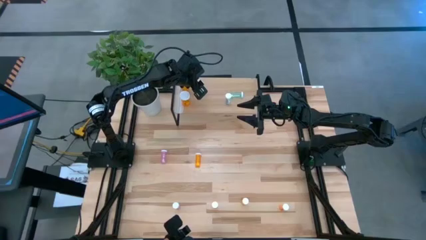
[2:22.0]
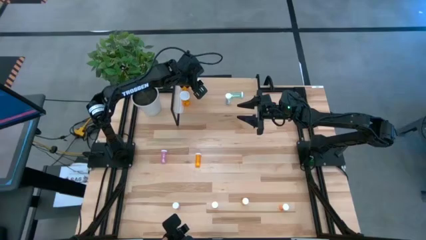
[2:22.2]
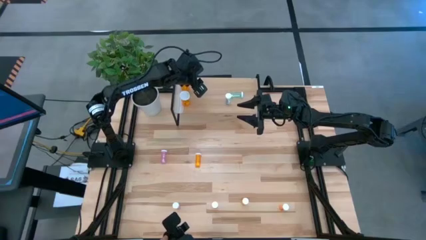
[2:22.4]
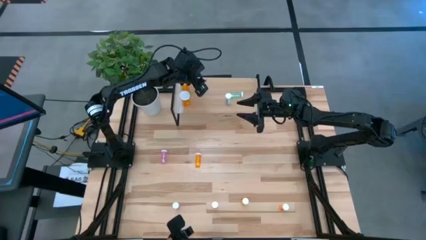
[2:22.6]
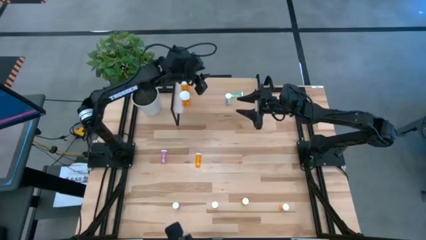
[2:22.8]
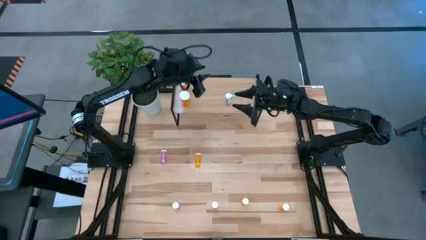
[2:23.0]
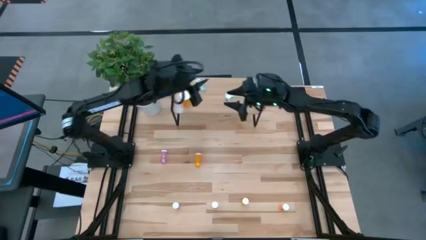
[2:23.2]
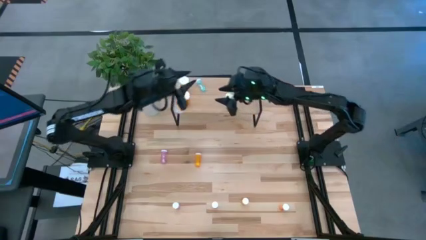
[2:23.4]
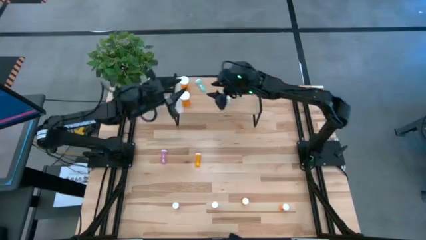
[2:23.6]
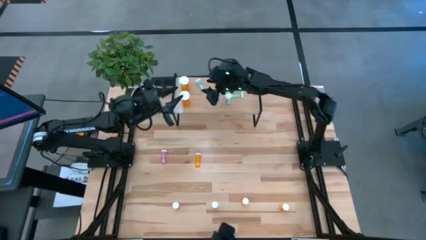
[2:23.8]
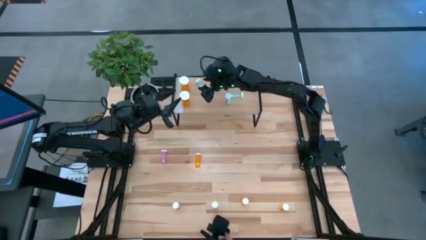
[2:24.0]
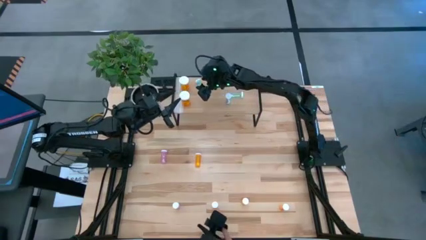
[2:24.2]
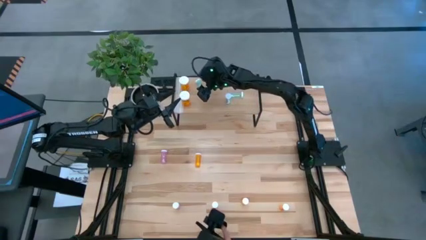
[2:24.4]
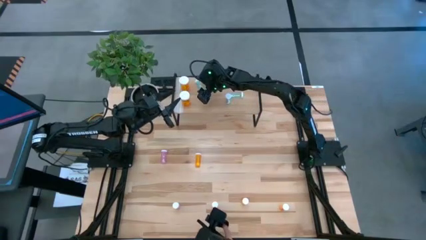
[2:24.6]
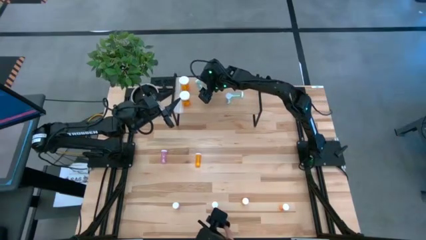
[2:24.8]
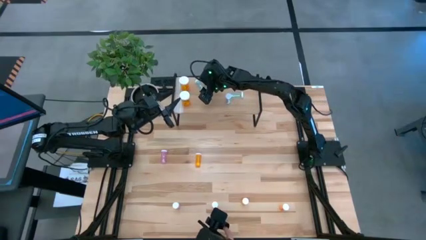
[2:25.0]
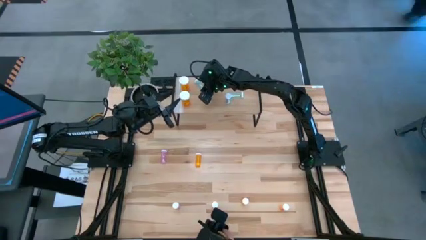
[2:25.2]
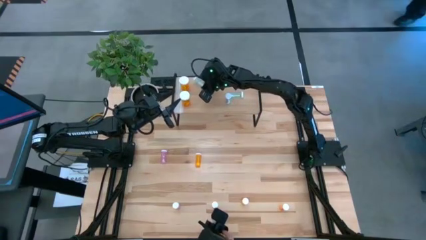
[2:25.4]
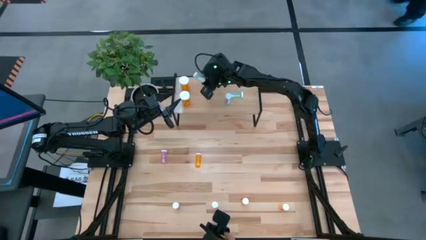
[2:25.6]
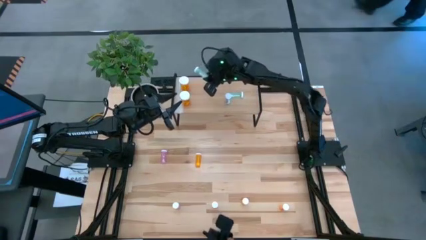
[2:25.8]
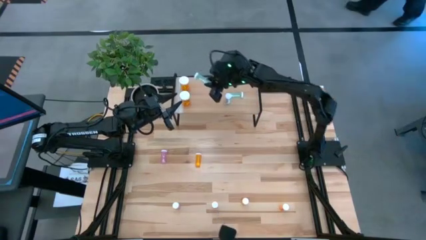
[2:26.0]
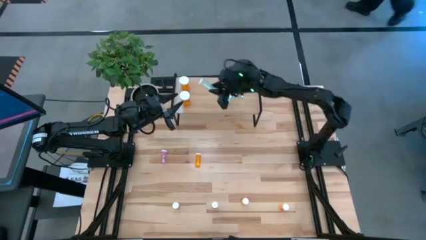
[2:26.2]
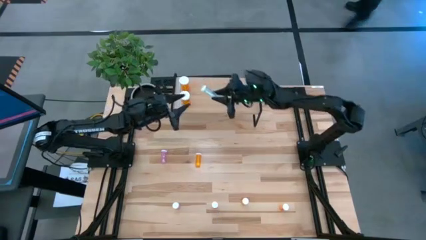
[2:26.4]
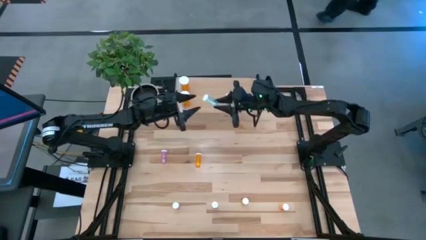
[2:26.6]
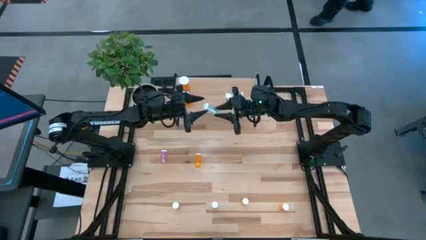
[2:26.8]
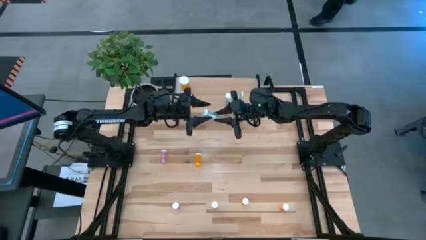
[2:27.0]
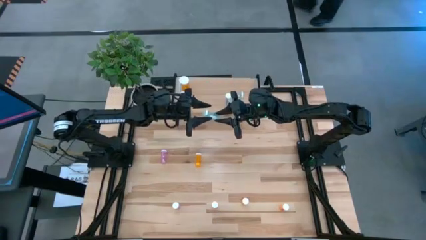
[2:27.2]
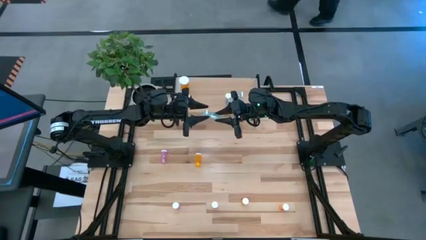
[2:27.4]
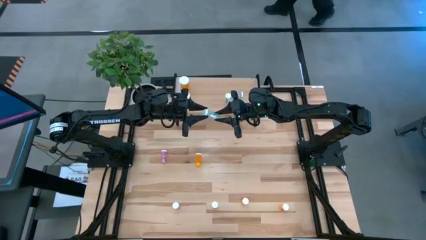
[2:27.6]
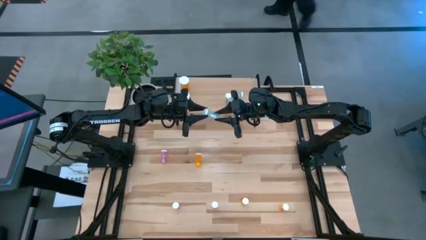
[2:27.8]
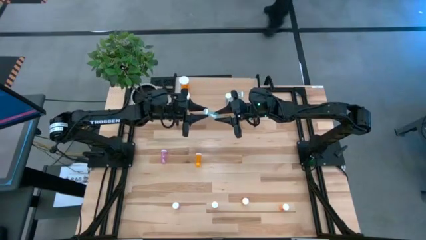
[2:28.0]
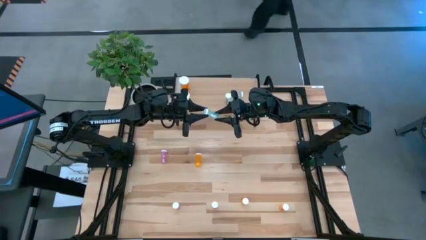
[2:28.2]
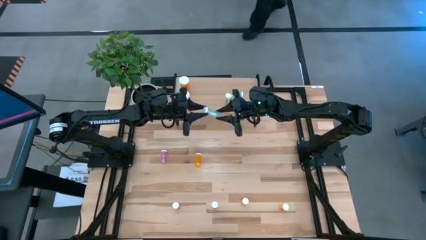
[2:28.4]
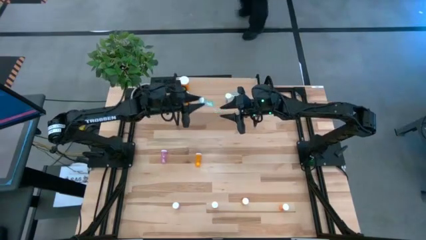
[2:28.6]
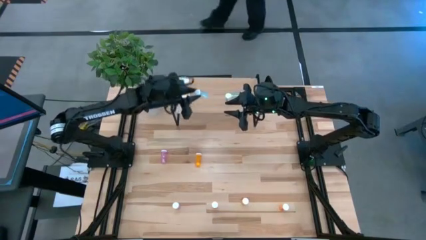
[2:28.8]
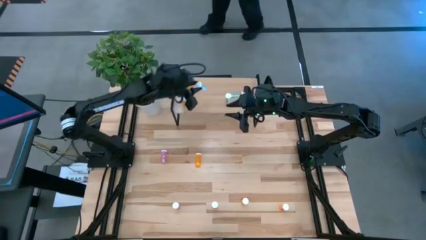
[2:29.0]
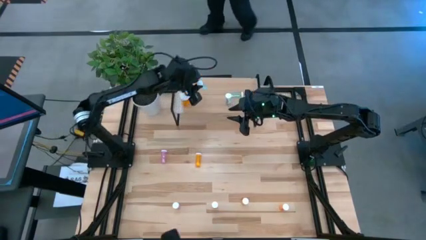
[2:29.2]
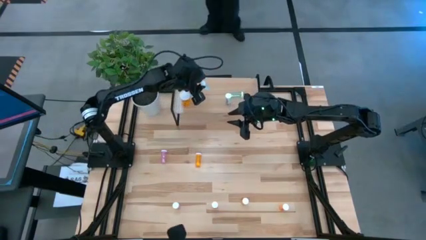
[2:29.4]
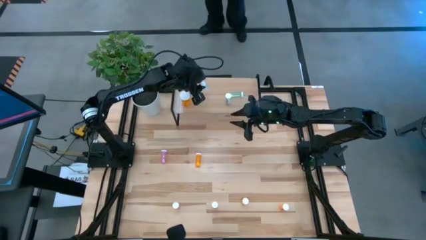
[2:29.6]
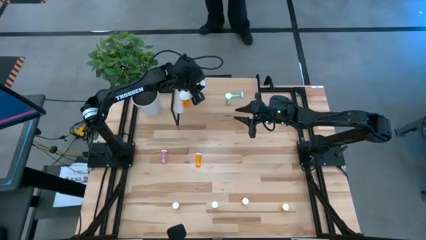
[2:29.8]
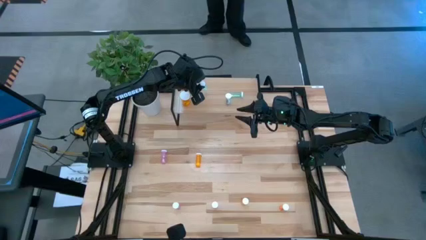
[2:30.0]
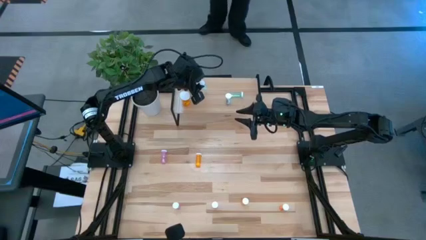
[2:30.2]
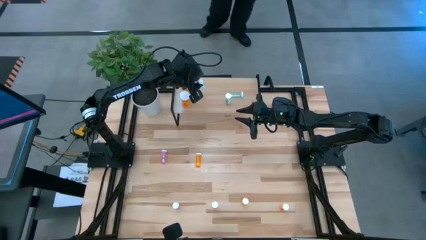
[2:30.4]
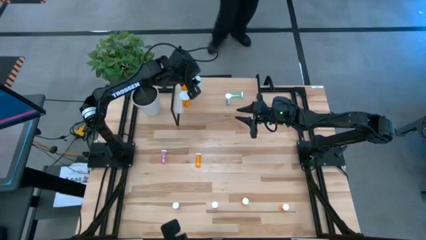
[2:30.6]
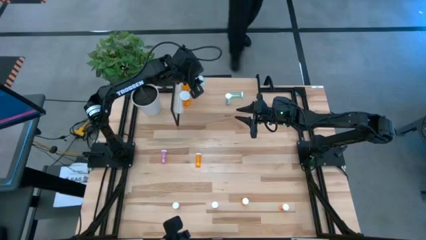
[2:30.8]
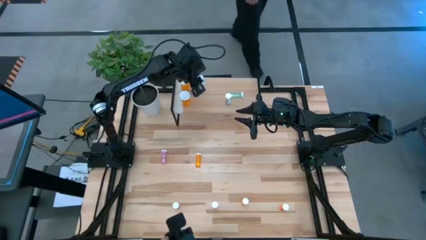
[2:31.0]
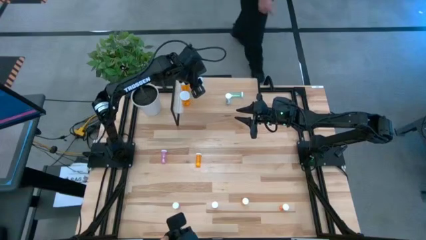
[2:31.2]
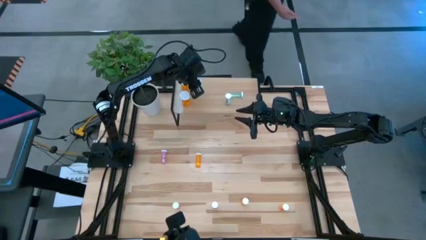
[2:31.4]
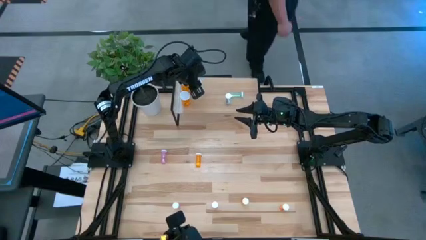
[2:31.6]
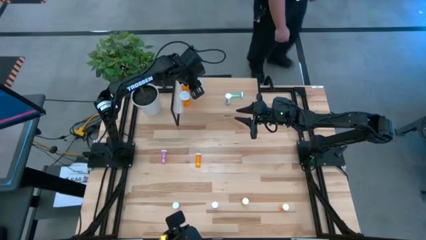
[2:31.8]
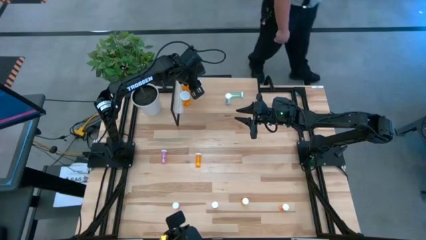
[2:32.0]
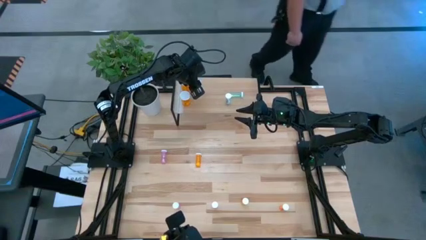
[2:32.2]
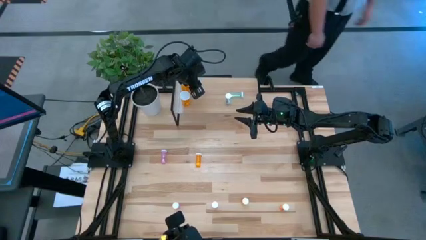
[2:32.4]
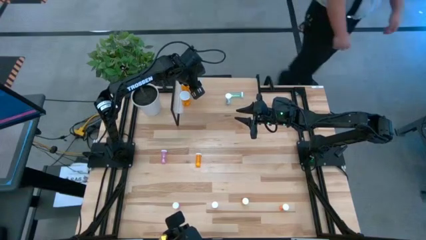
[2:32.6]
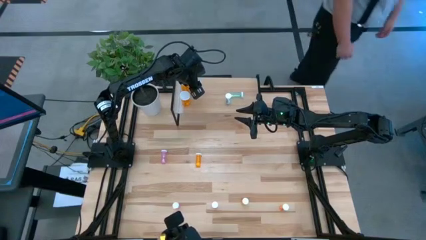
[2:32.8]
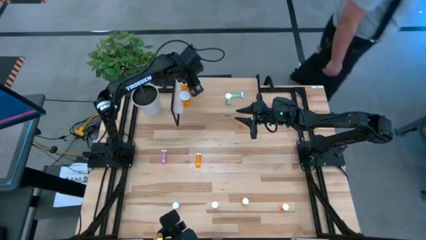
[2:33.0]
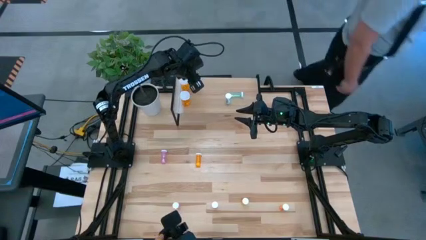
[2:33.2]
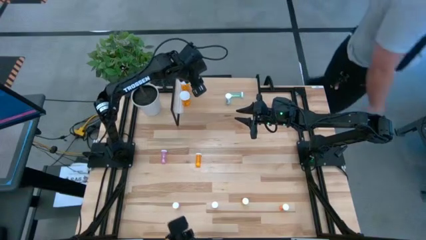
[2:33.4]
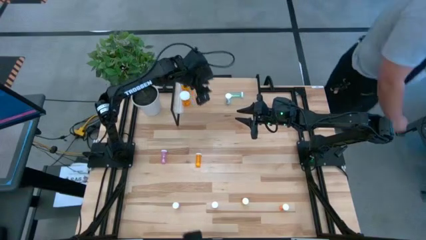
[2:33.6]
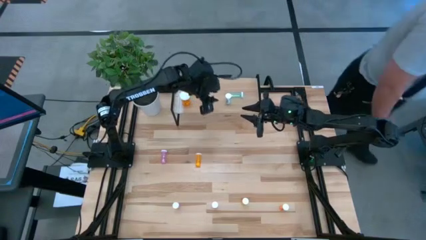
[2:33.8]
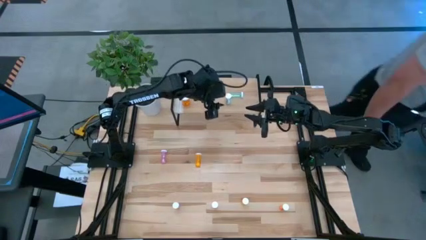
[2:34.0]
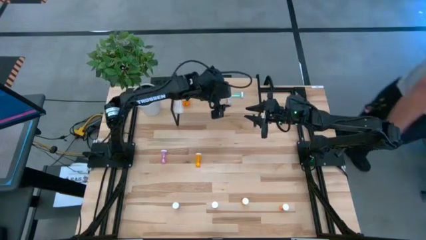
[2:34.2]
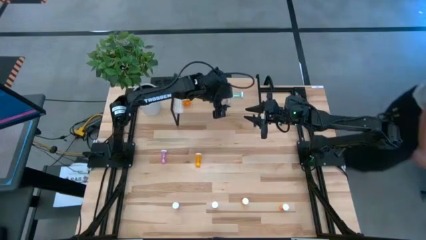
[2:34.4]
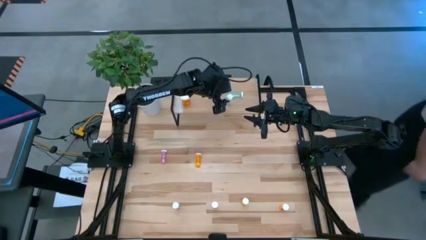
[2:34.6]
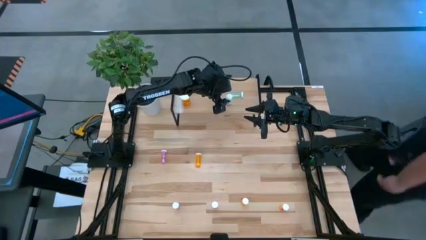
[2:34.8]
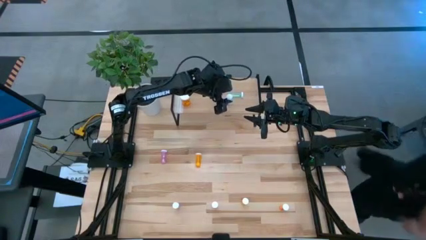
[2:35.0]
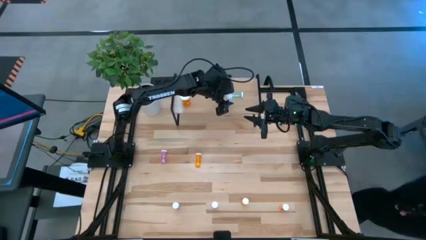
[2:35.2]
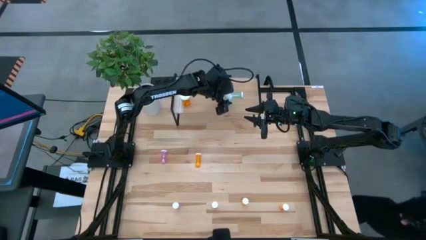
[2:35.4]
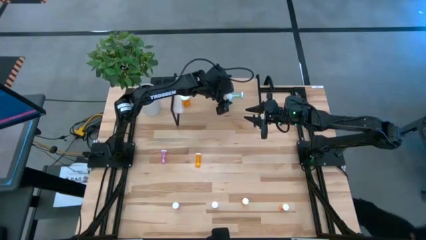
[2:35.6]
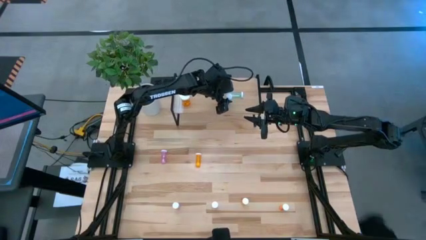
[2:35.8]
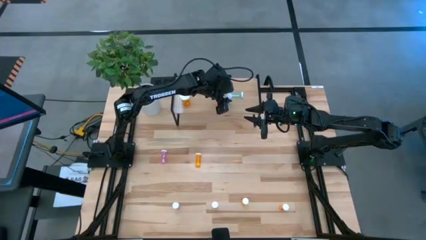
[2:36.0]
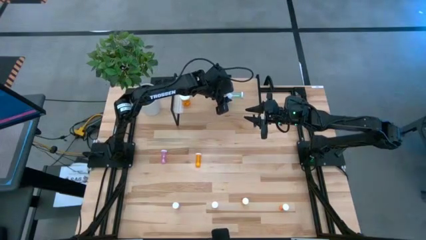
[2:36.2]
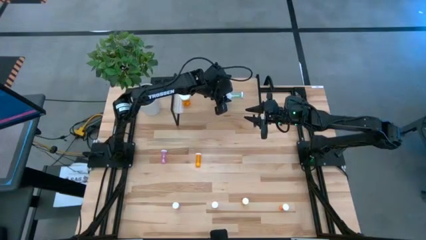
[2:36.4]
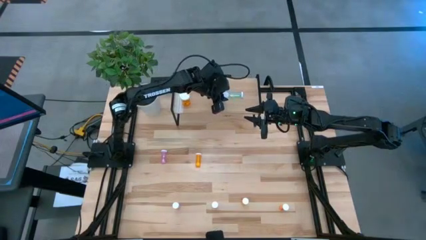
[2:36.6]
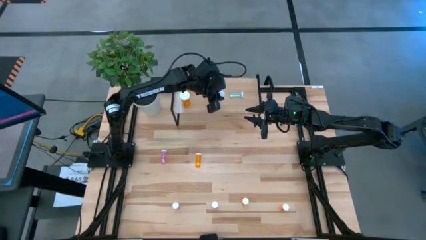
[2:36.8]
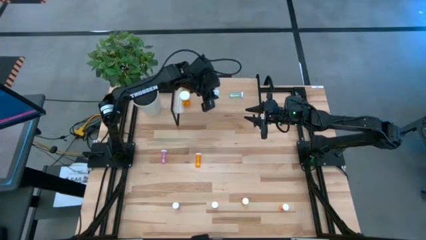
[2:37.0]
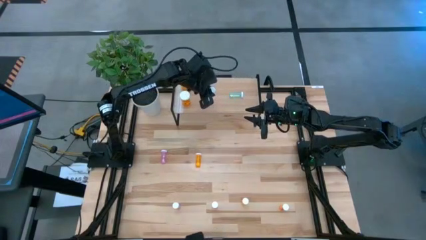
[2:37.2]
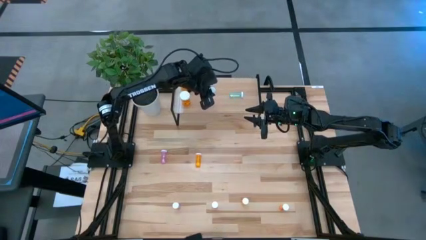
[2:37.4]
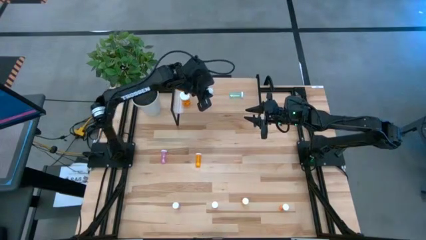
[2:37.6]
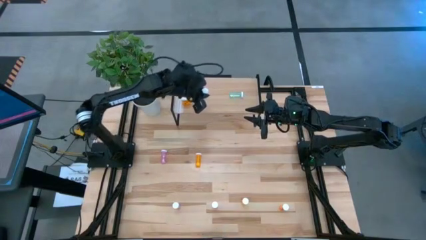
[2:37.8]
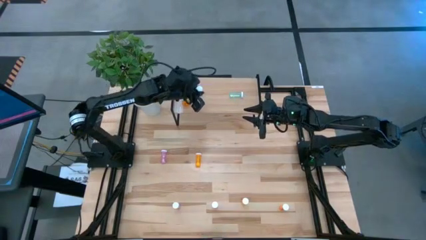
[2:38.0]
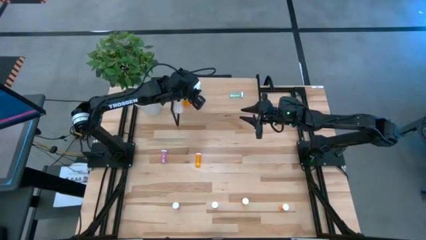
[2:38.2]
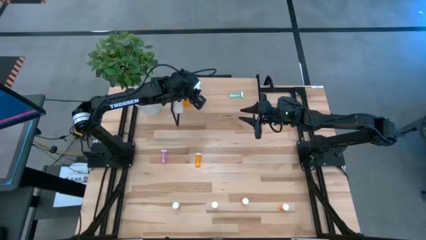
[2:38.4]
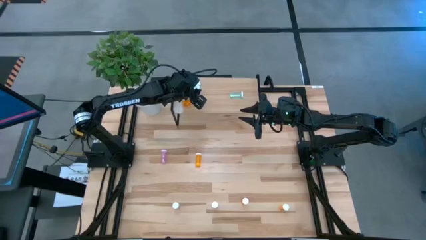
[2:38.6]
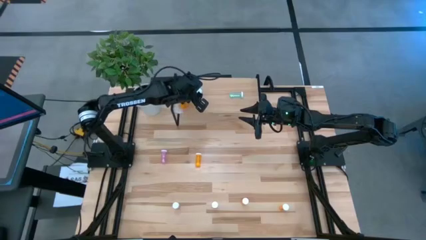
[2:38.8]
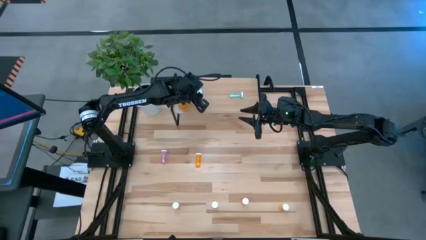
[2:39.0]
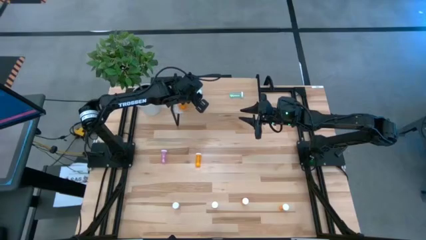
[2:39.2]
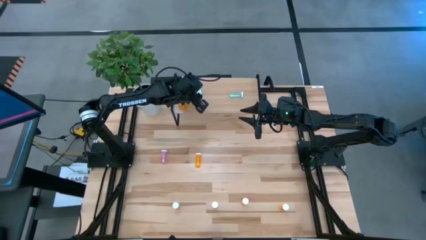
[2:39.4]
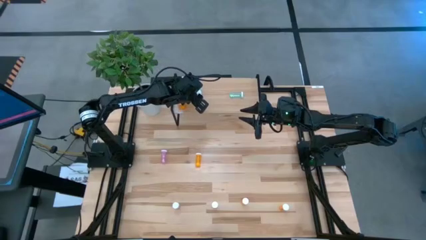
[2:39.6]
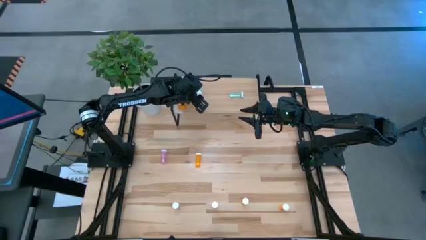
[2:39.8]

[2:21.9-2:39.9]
Task: Pick and place medicine bottles onto shelf by color
Adjust the green pill bottles on the shelf
